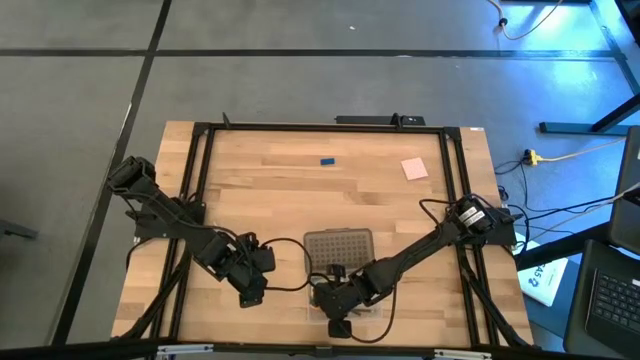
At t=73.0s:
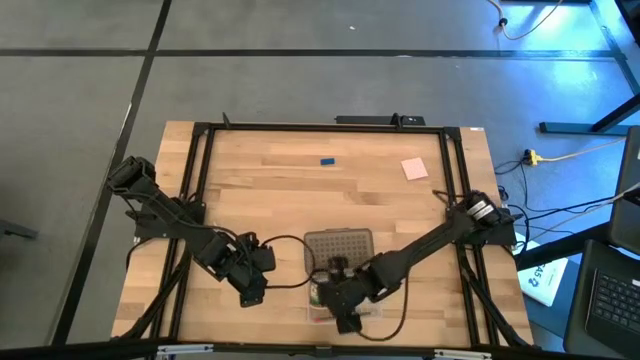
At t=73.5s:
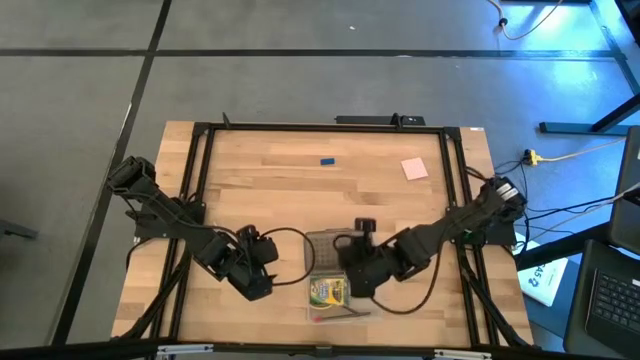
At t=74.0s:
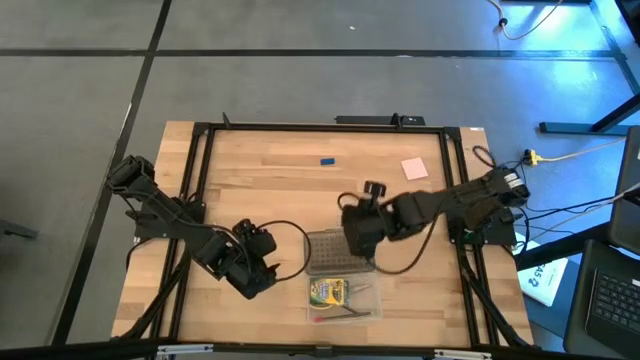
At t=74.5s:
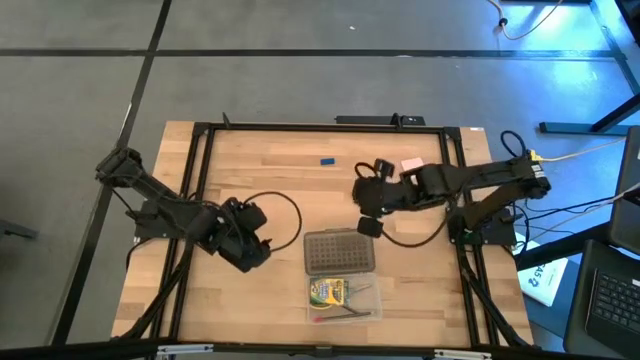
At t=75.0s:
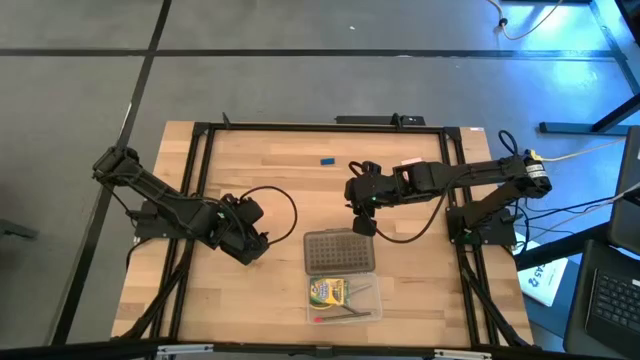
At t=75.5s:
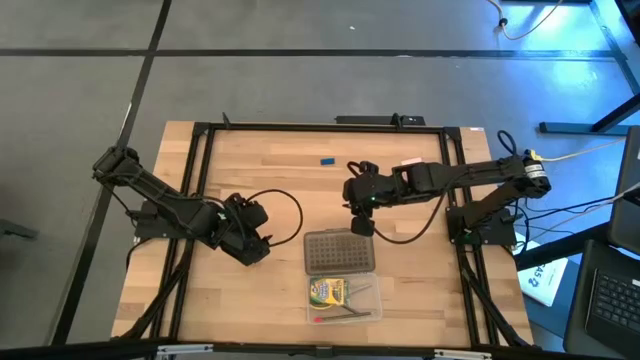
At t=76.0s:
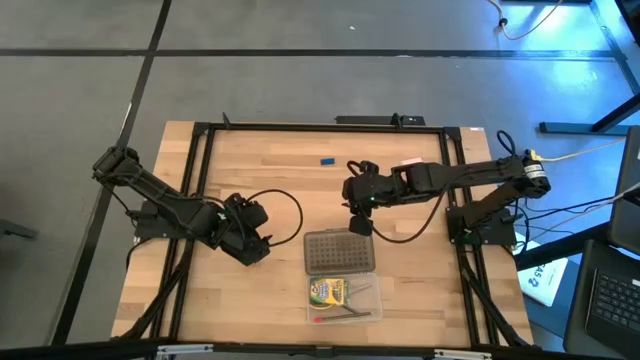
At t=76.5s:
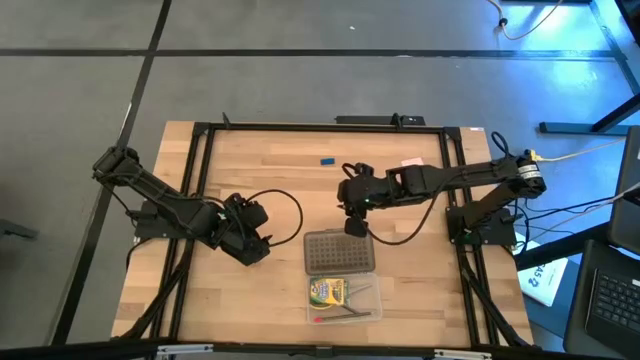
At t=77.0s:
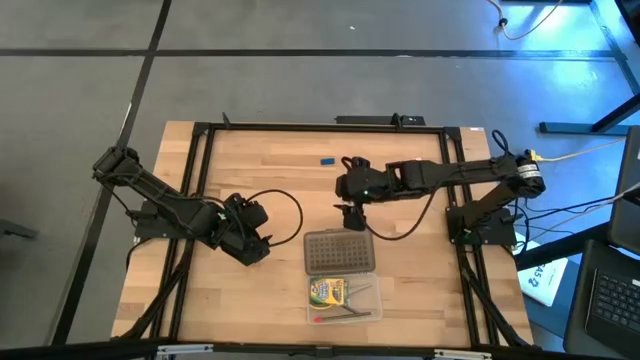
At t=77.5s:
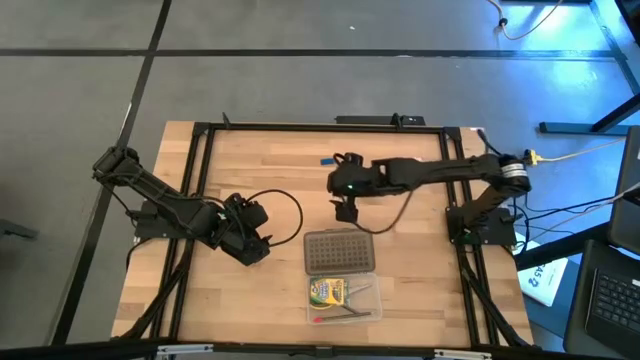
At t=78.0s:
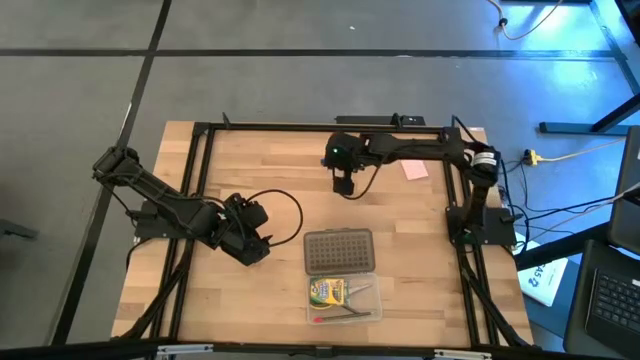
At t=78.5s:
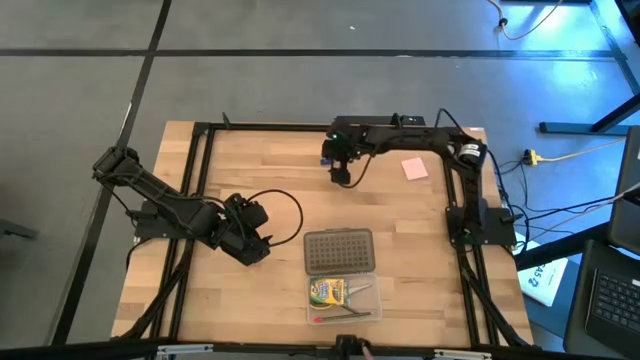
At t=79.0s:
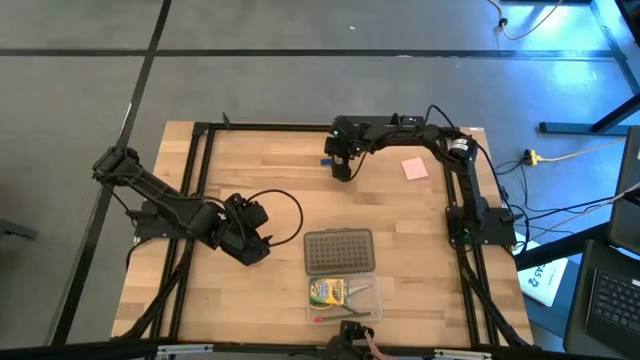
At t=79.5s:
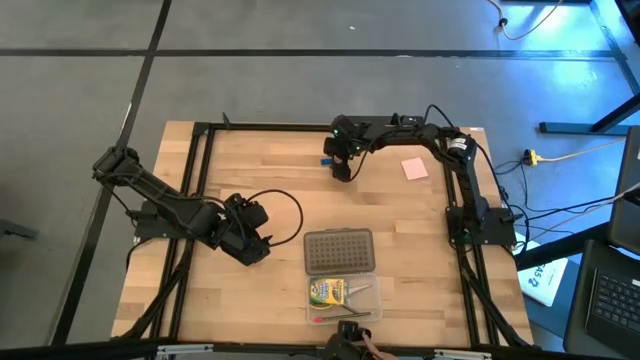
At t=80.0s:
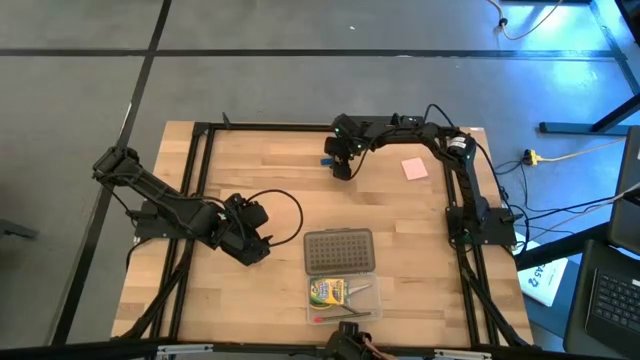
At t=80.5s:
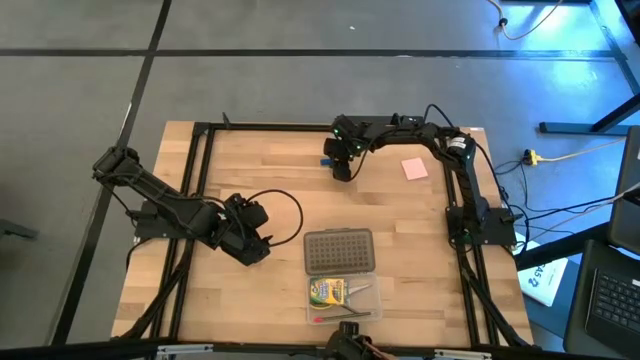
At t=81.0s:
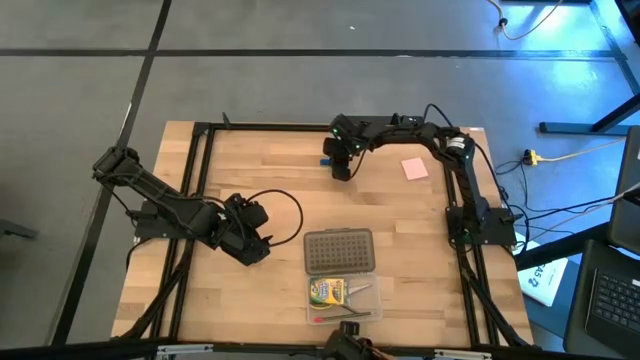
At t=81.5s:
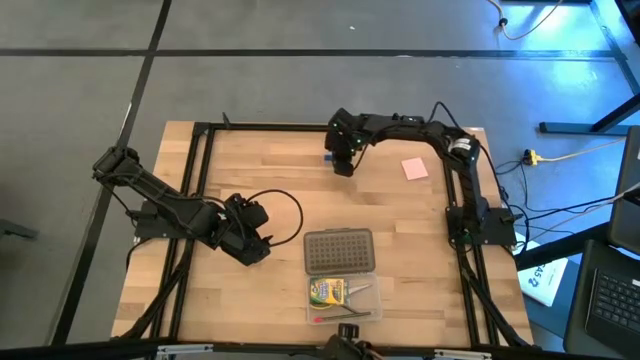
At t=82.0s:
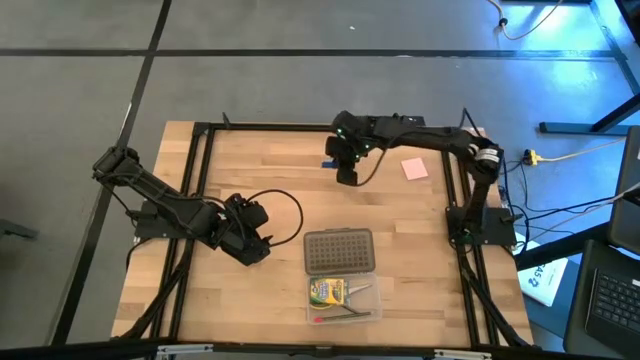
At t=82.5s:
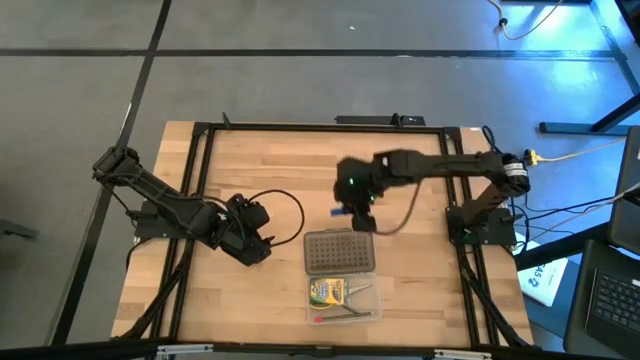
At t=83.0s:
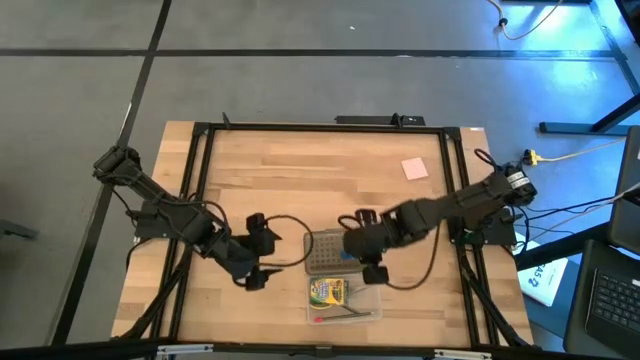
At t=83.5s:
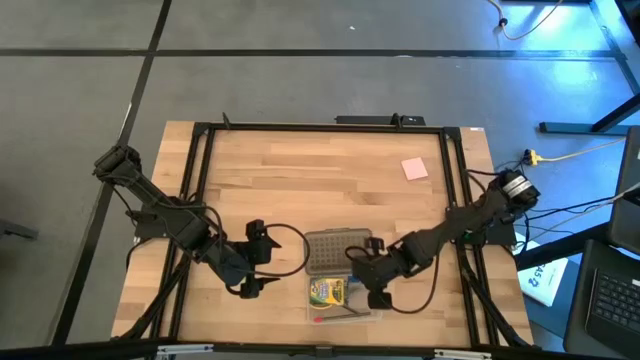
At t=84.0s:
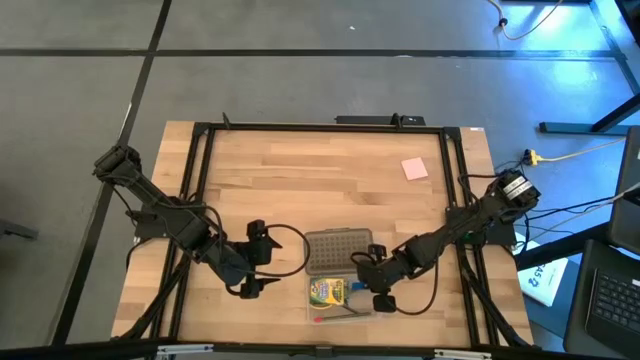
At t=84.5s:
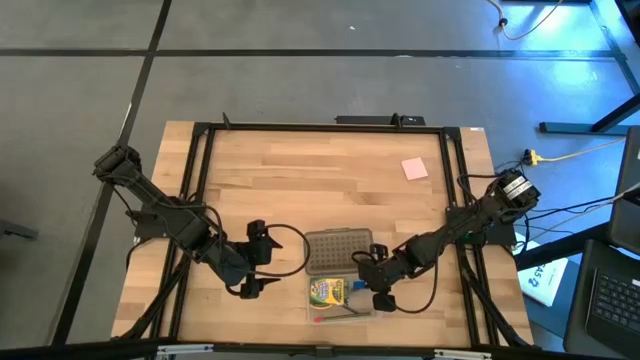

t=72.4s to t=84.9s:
Task: Pack school essentials
Put the blue eraser into the supply box

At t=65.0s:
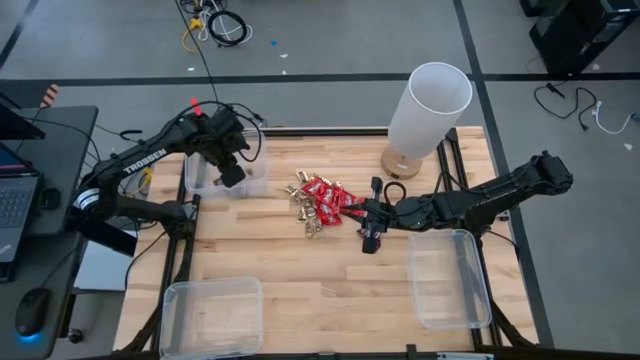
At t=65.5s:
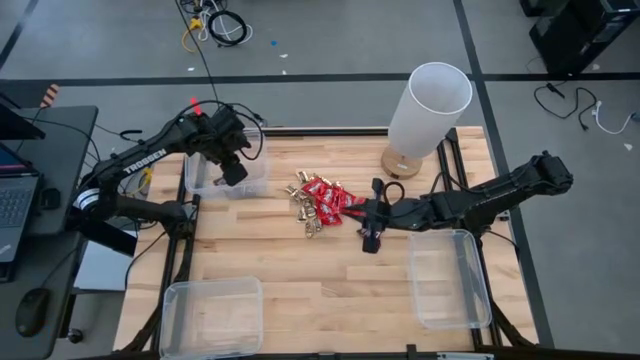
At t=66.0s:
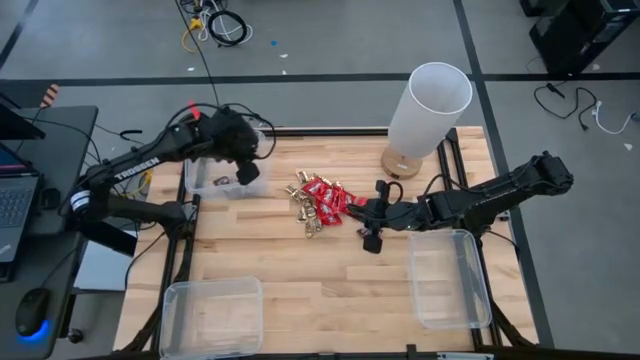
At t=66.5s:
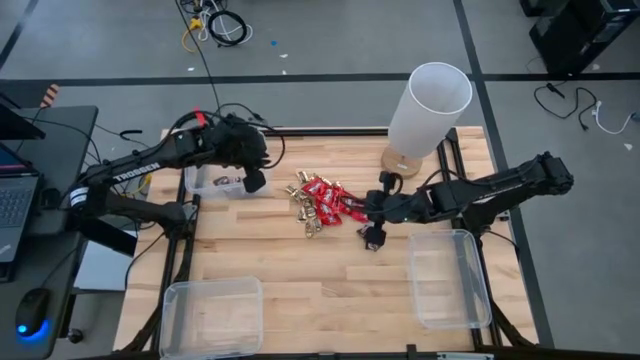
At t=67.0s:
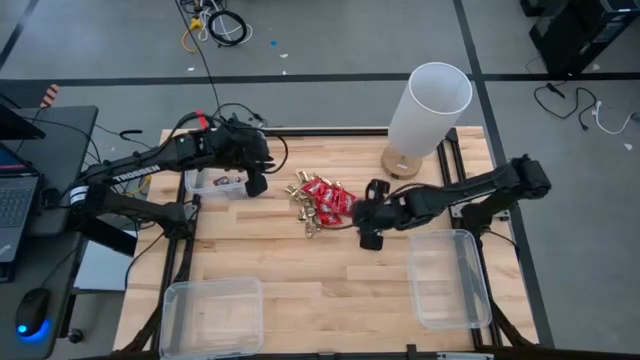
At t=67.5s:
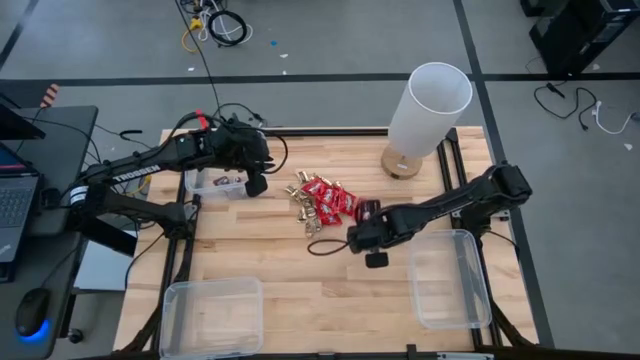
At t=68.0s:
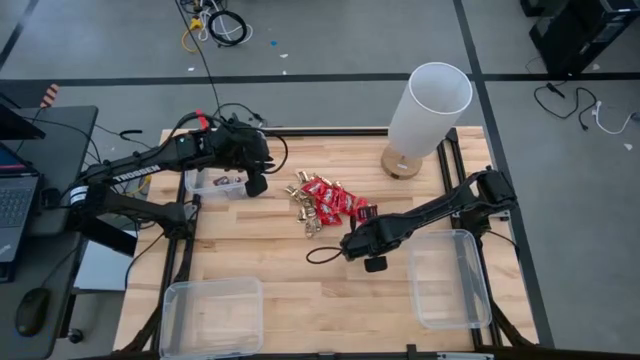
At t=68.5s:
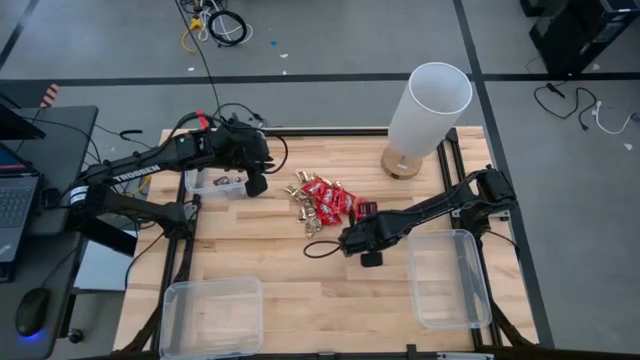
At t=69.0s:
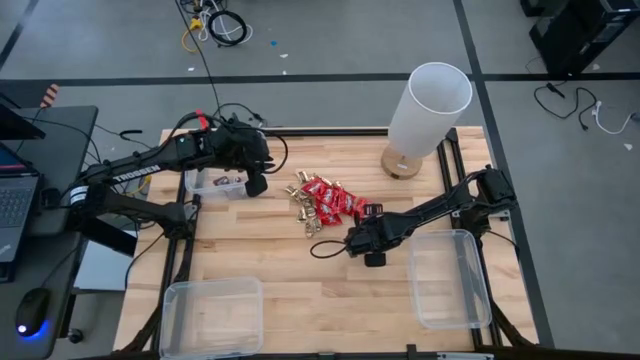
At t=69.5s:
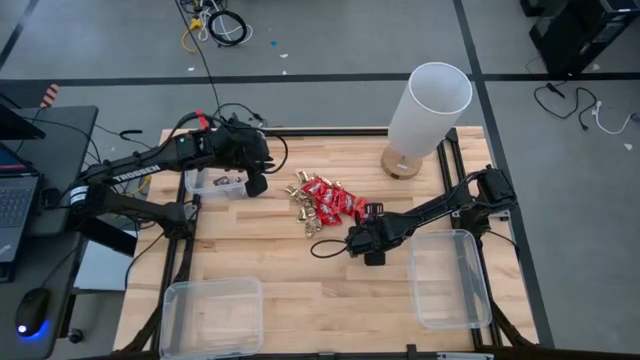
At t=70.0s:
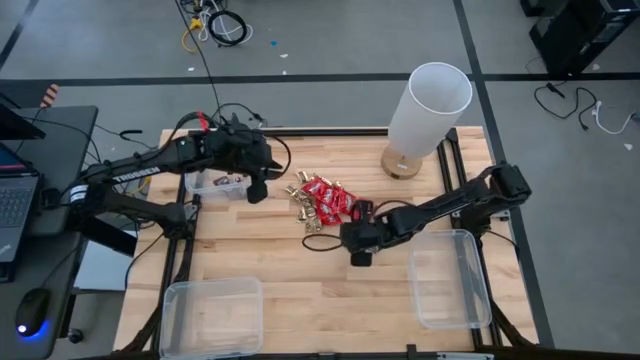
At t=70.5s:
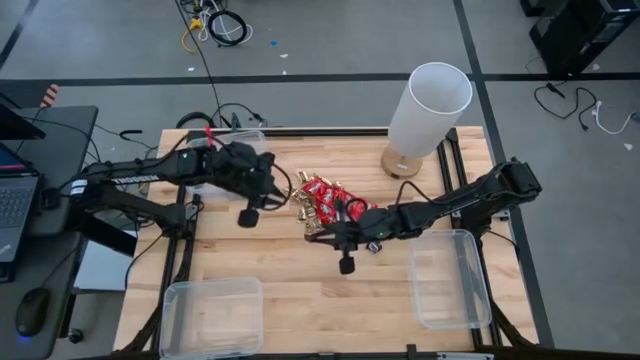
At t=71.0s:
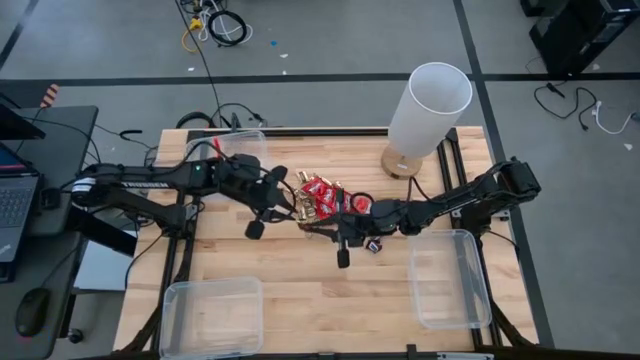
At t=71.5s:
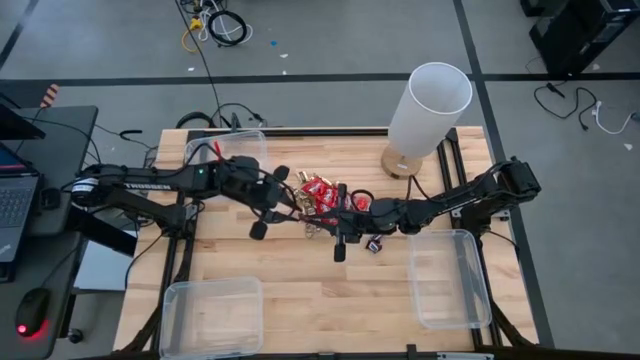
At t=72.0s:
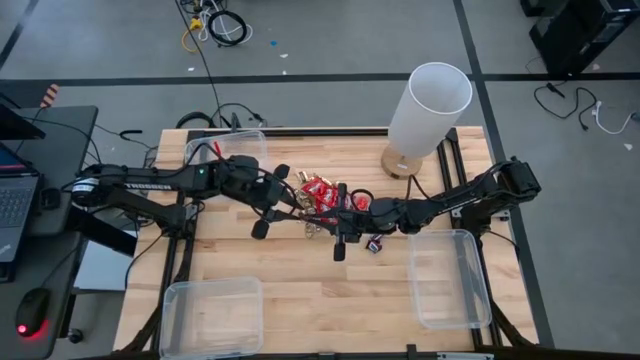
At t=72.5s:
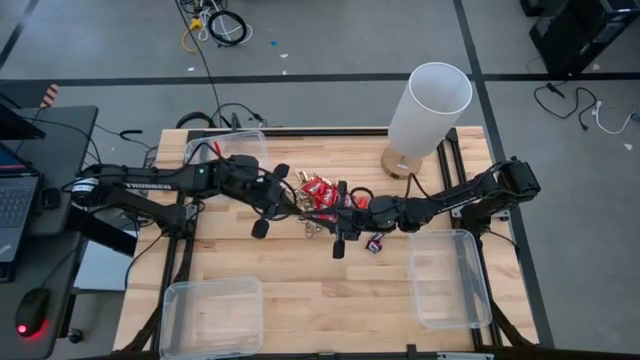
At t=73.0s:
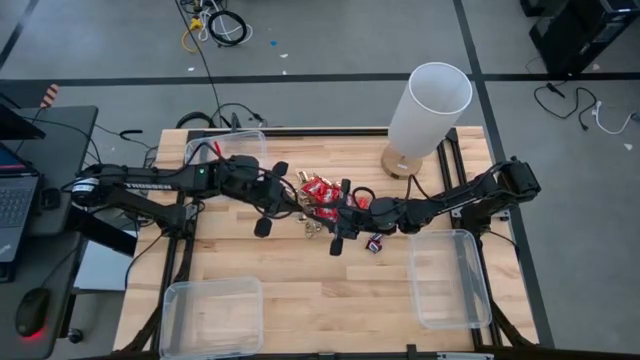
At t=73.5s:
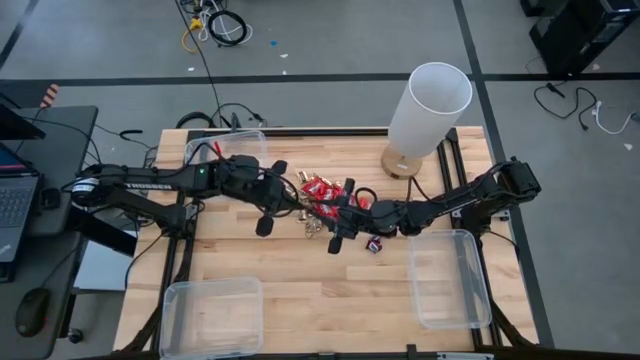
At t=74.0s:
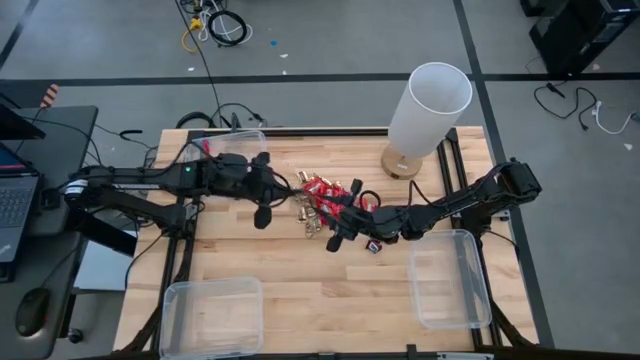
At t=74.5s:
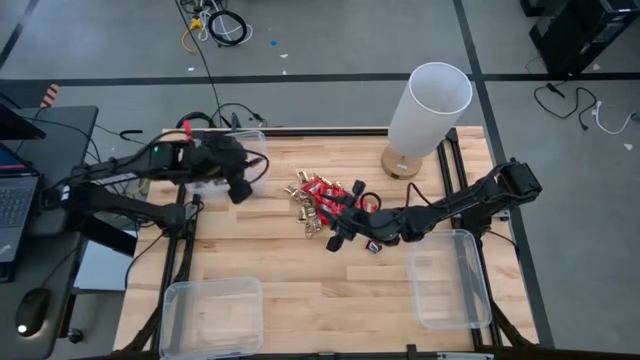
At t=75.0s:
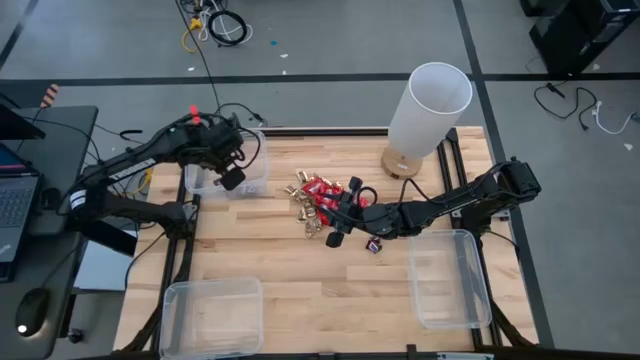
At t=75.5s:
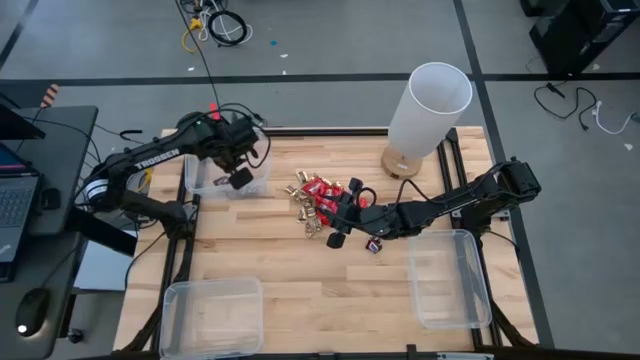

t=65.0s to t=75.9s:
Task: Sort candy
Put the brown chocolate into the top left transparent bin
